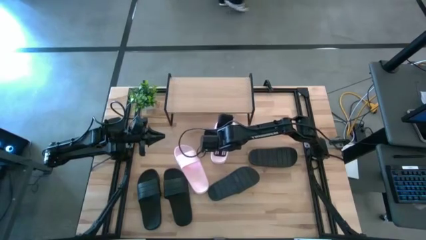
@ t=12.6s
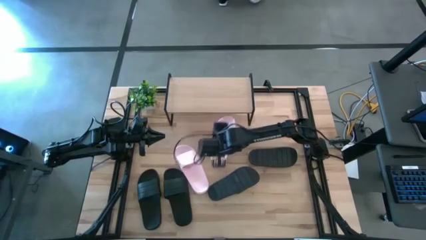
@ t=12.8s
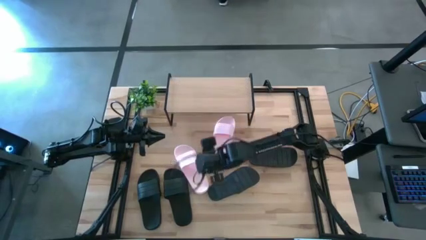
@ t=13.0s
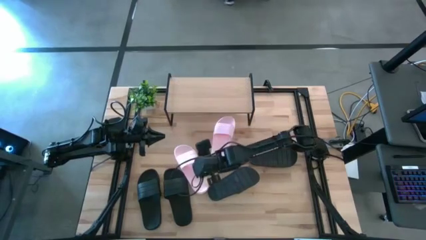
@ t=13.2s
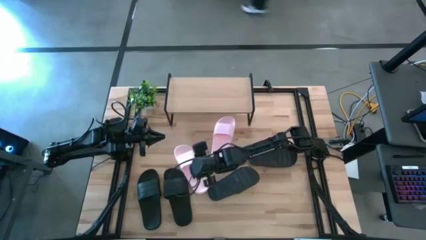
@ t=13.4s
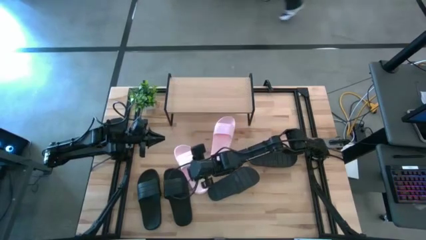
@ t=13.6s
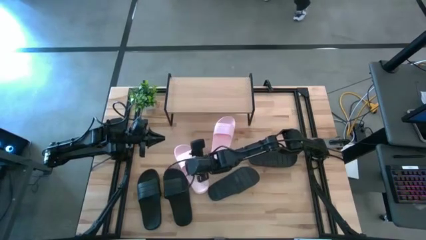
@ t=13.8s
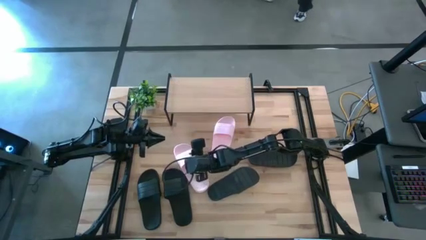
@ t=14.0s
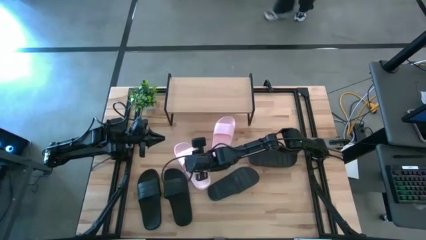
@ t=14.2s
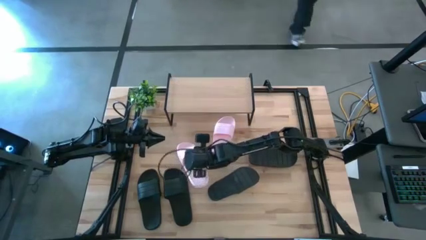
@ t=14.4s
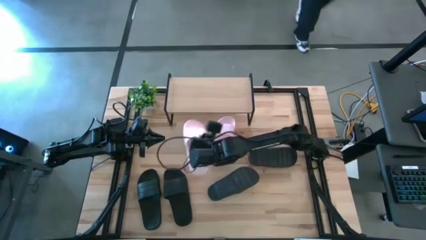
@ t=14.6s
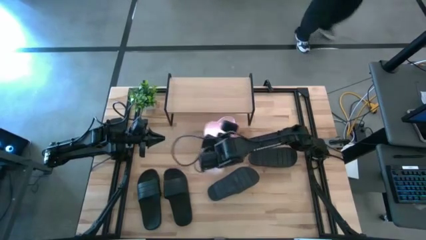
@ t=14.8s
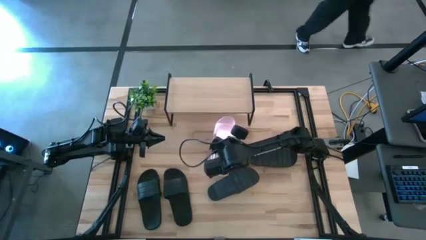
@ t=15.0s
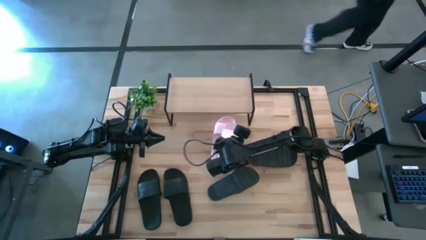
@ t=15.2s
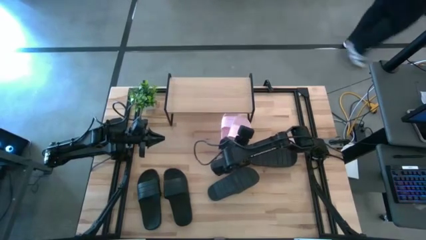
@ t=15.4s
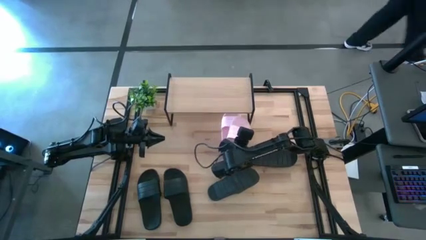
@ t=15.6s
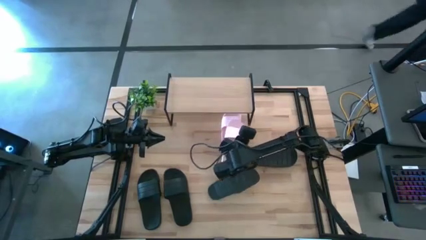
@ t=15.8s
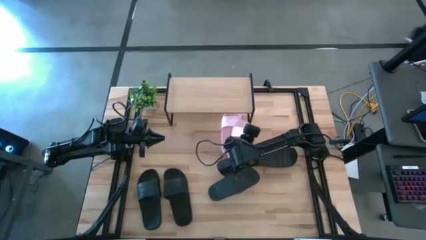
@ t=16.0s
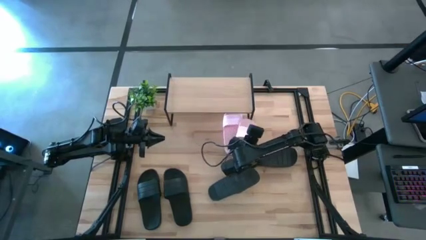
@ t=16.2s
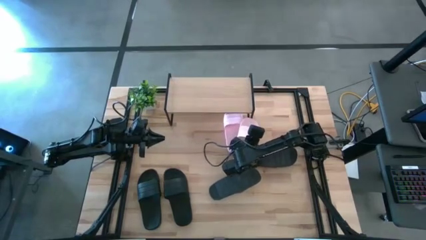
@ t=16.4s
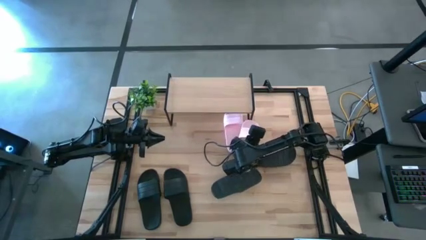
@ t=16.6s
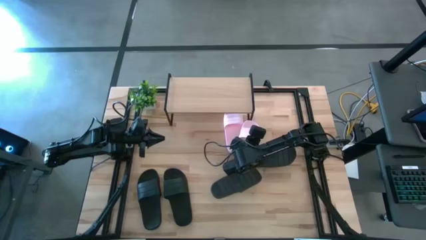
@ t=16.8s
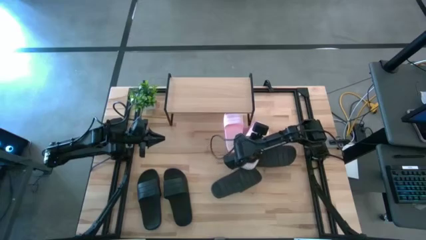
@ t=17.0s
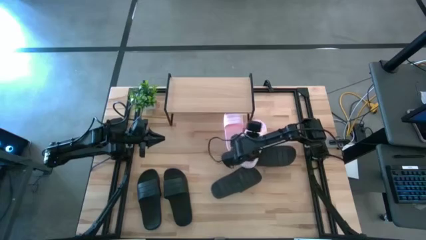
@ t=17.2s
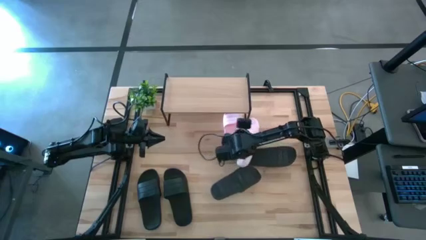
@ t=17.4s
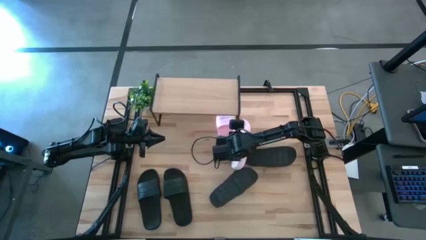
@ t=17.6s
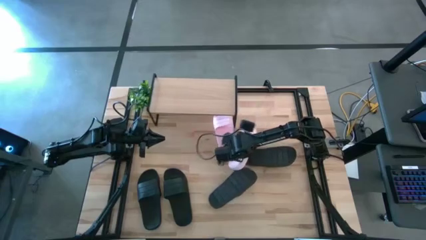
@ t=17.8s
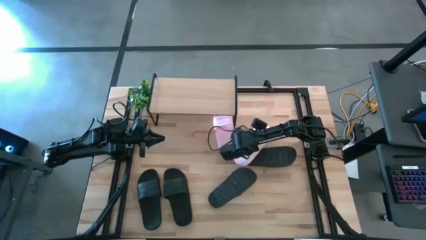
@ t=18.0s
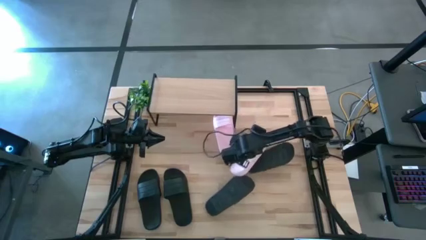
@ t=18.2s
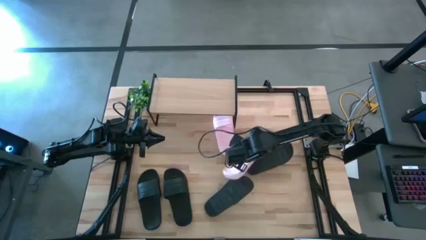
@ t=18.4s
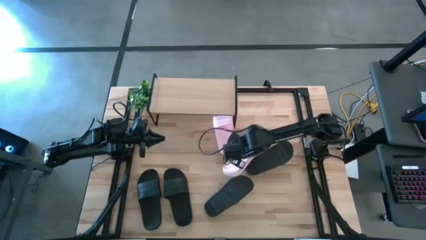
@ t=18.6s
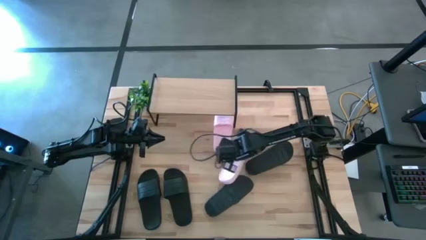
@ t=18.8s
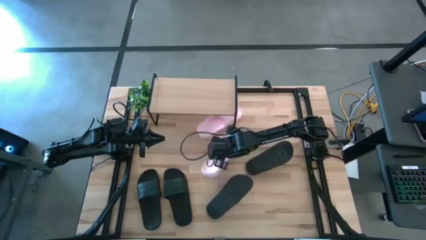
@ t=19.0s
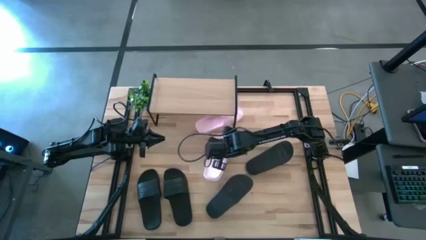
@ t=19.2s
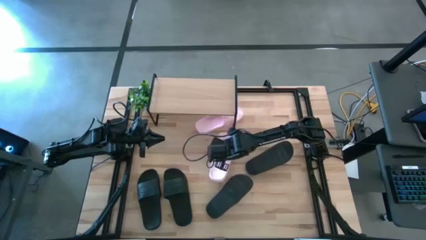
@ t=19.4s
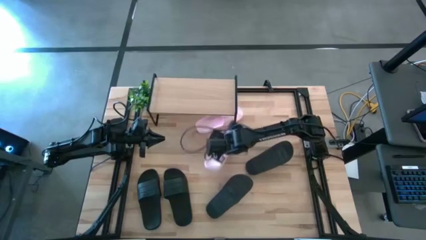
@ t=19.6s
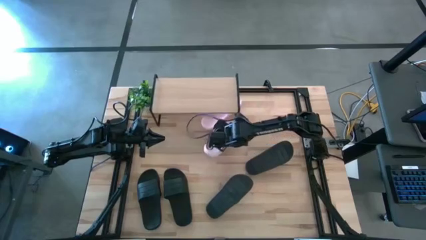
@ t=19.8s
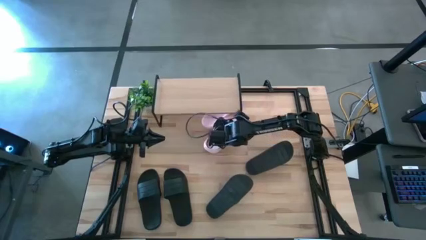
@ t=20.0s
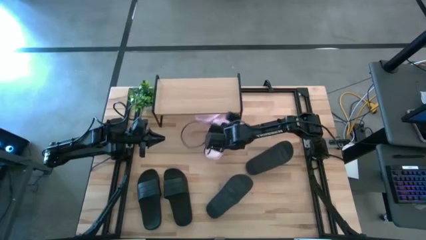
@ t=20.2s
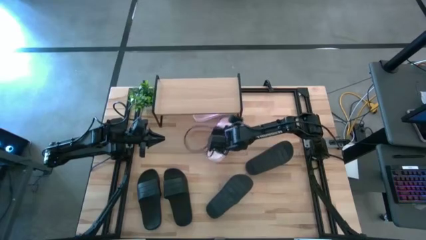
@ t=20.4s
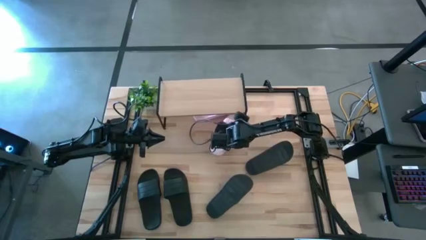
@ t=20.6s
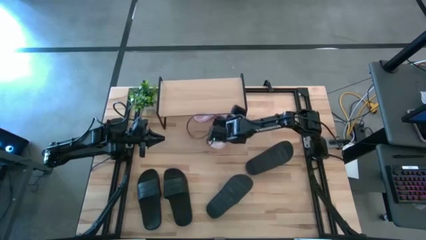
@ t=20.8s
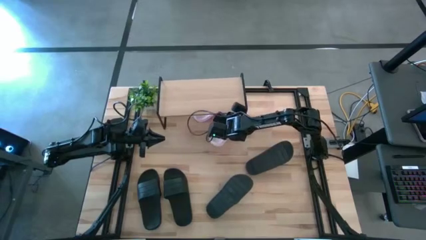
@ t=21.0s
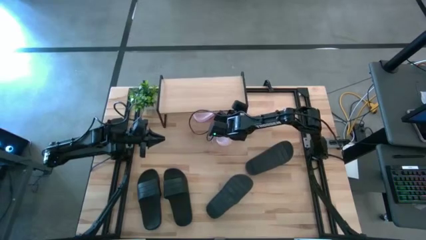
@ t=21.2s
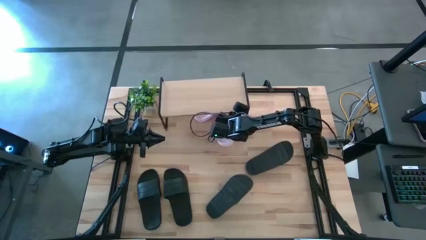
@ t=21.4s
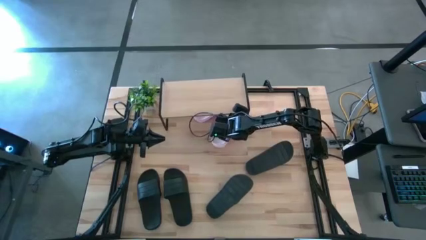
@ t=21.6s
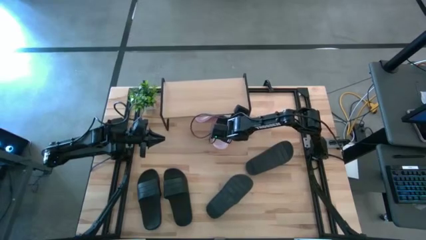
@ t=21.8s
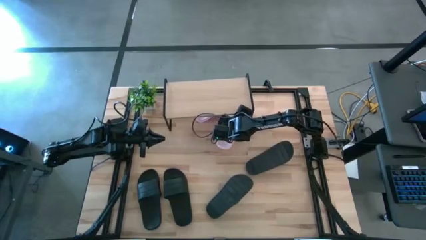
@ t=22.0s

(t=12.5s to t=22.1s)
Task: Pick and place slides into the shelf
Put the pink slipper under the shelf

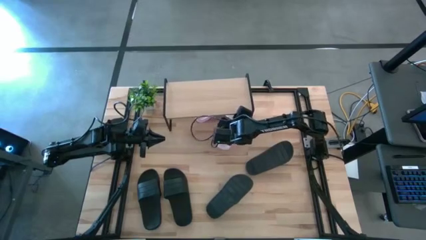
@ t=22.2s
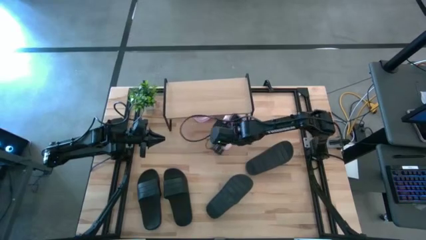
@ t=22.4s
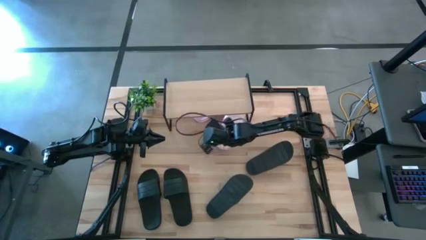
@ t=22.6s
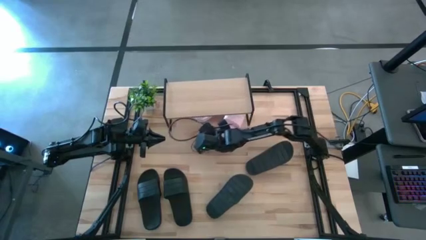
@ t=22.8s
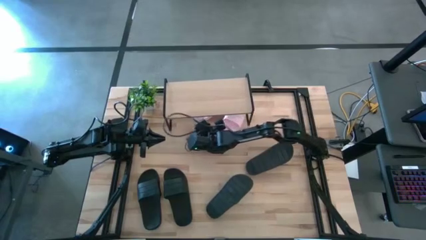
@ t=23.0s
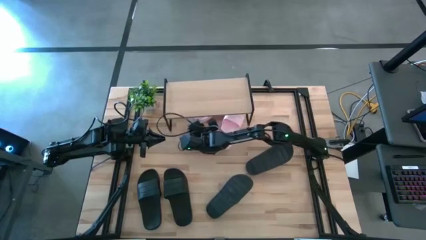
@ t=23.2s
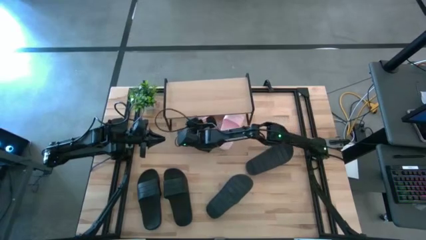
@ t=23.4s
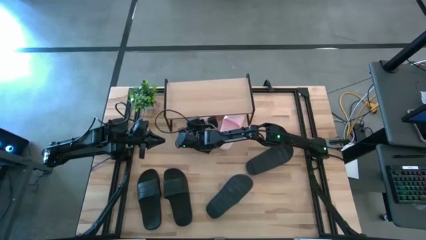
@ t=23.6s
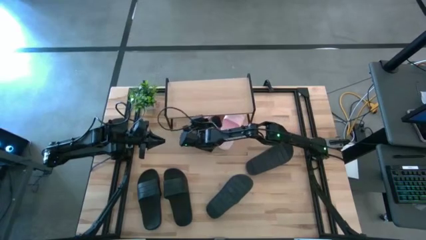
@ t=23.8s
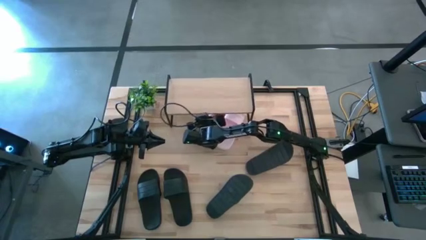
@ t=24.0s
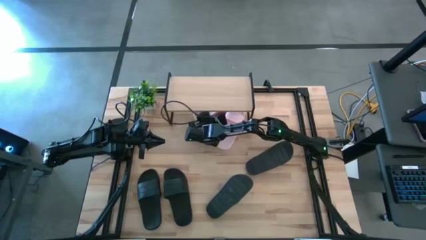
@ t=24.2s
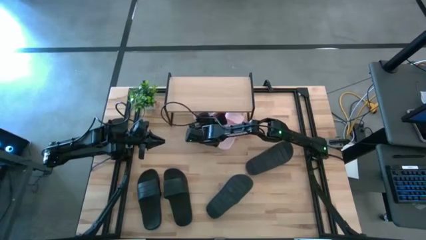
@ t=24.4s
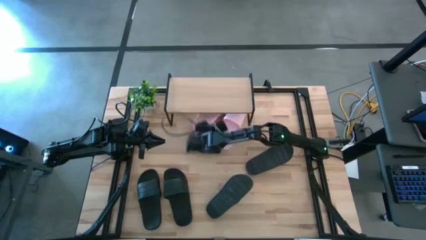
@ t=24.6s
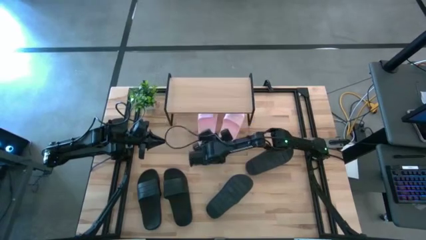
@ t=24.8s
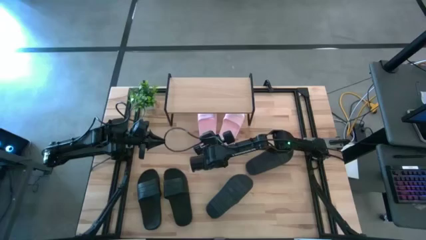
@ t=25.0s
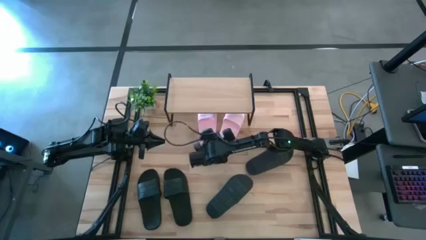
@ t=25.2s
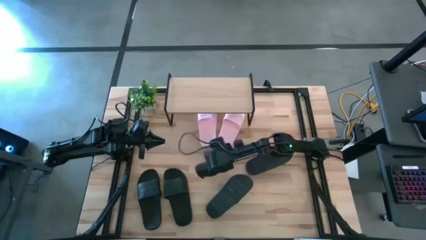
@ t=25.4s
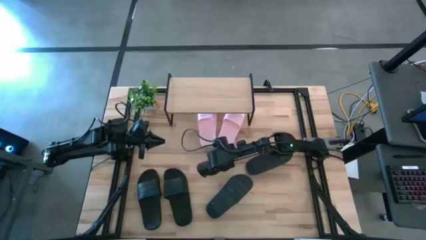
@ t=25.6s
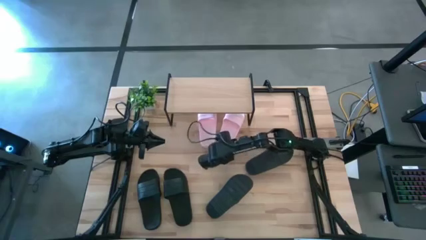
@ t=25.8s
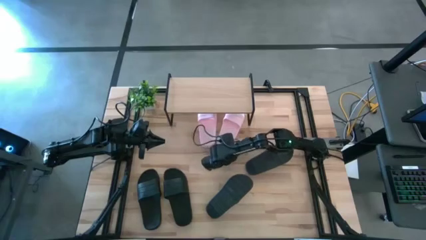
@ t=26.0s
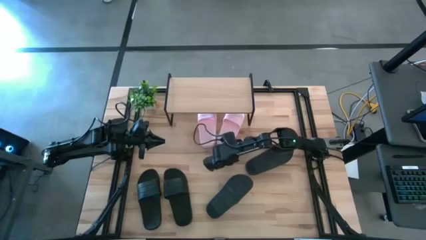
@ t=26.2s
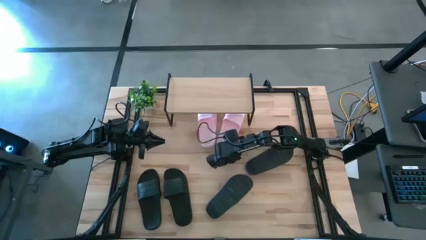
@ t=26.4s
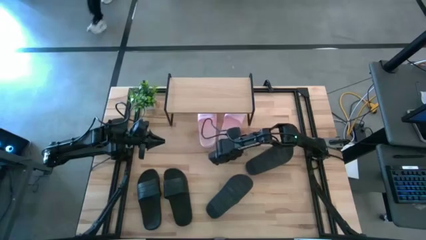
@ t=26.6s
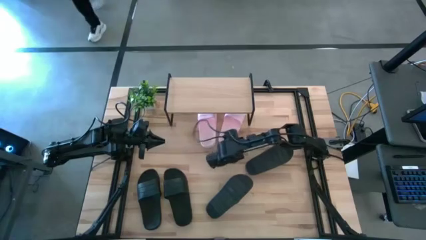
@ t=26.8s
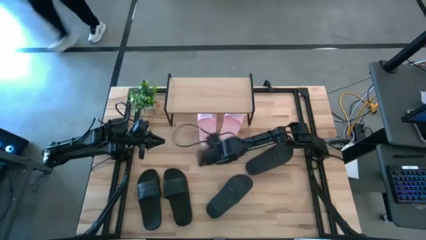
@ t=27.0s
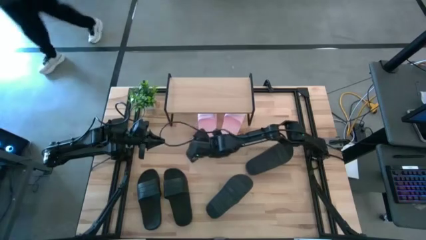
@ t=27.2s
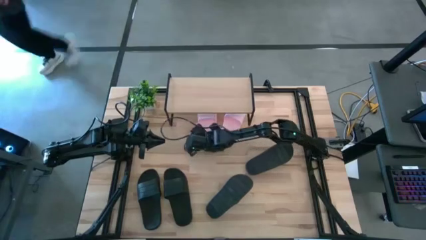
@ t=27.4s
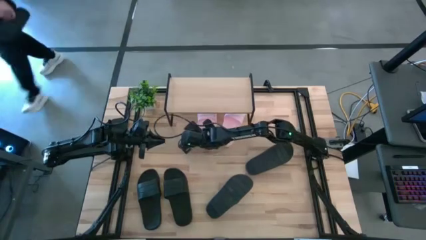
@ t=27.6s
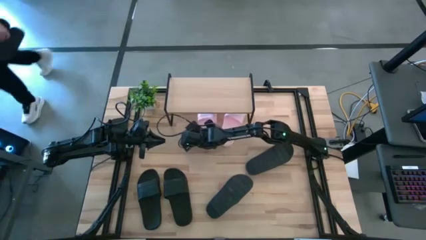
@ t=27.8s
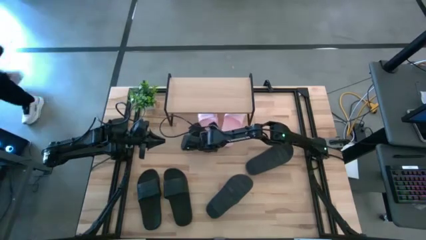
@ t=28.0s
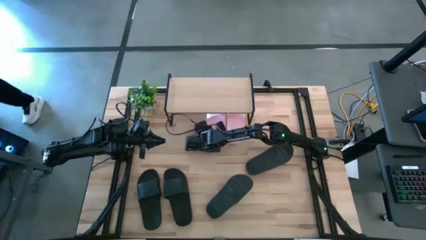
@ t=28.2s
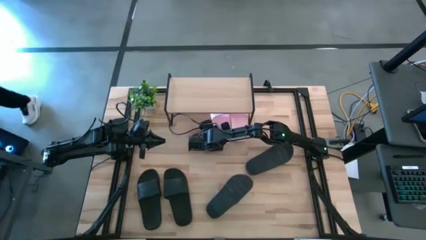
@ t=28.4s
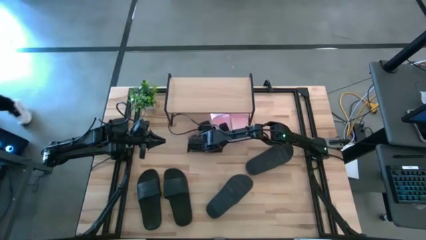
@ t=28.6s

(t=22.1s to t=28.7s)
Adjust the pink slippers under the shelf
